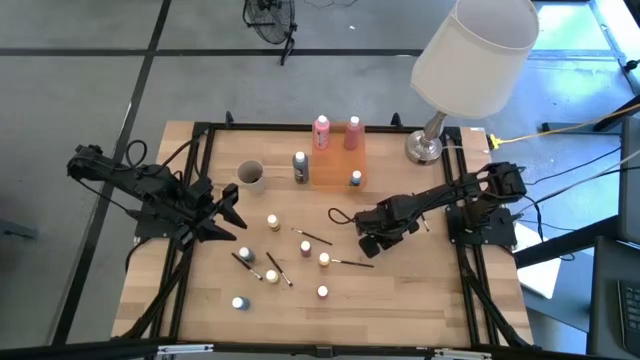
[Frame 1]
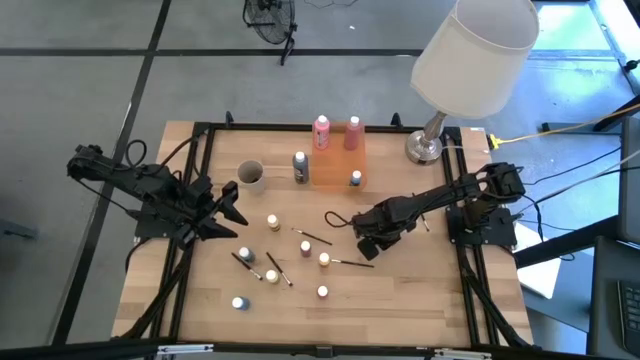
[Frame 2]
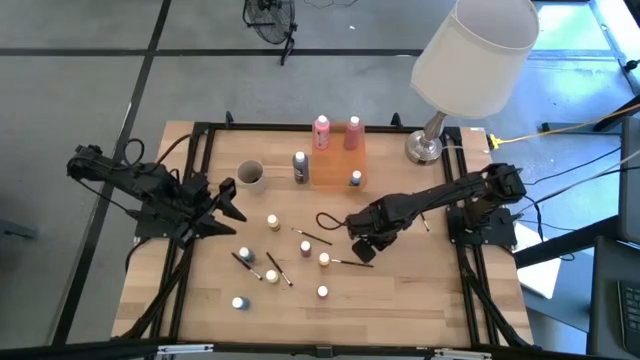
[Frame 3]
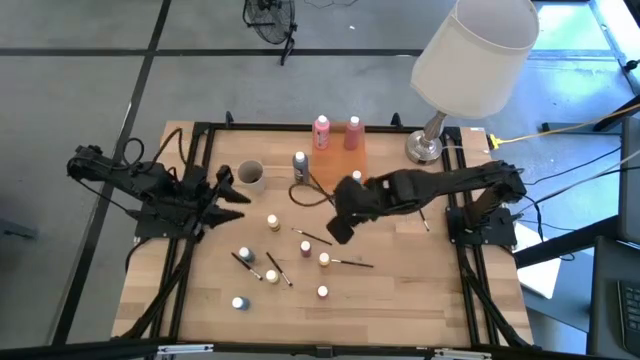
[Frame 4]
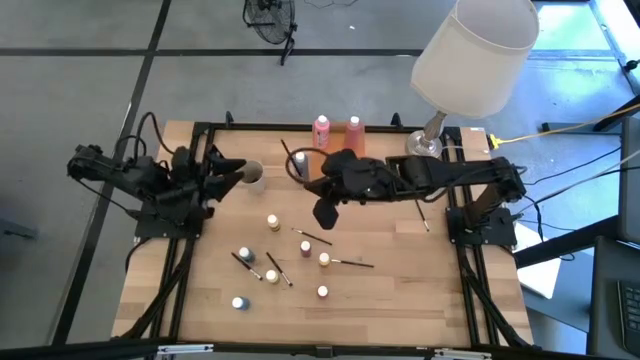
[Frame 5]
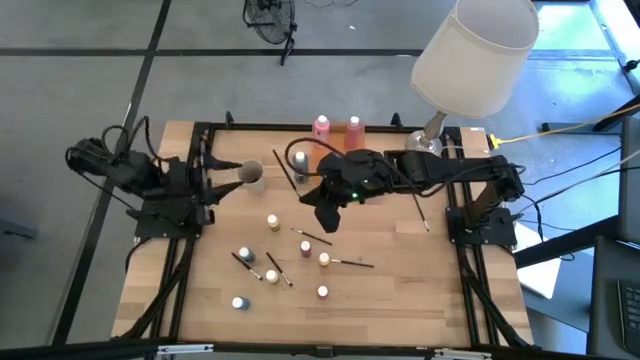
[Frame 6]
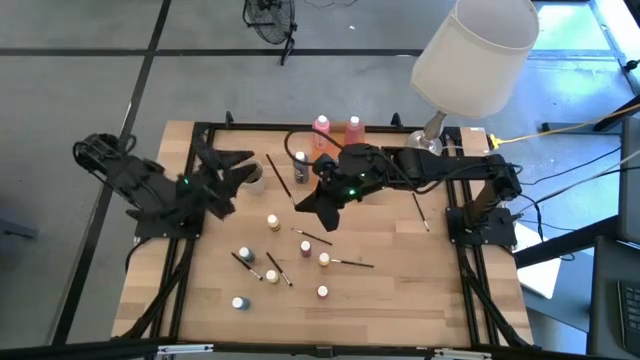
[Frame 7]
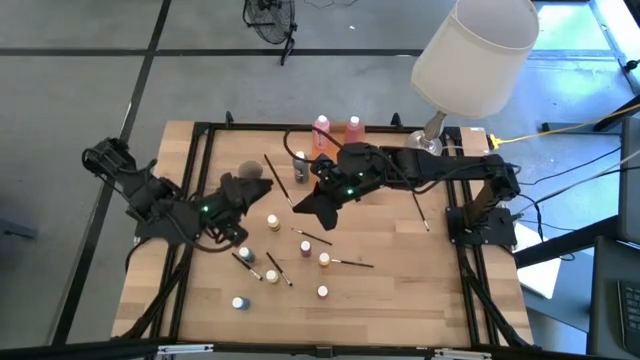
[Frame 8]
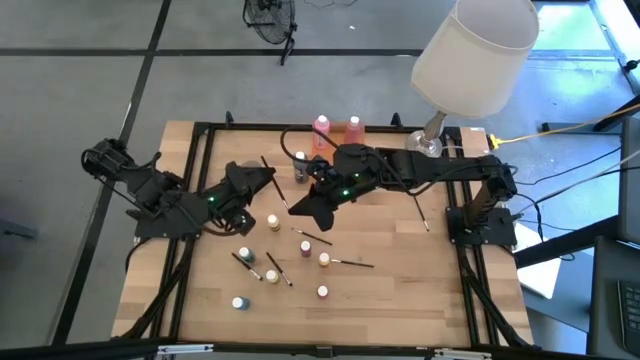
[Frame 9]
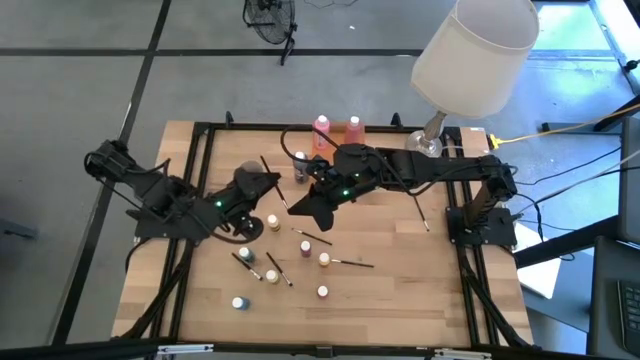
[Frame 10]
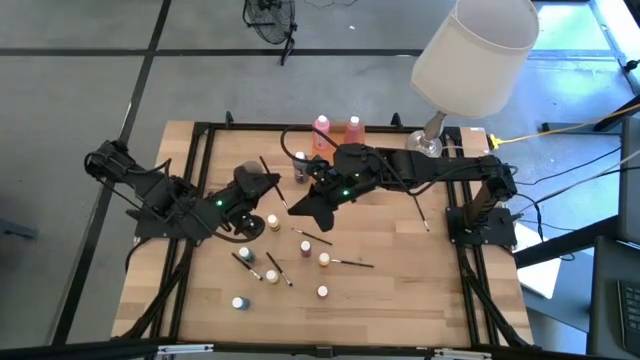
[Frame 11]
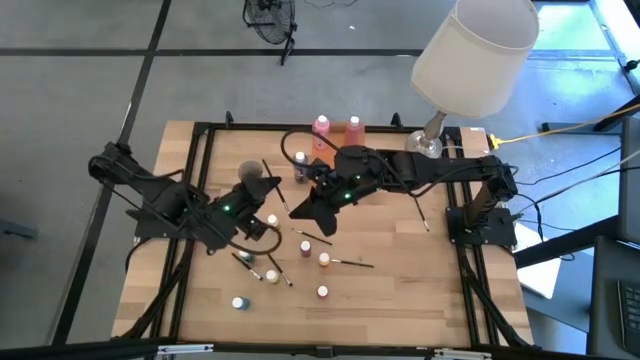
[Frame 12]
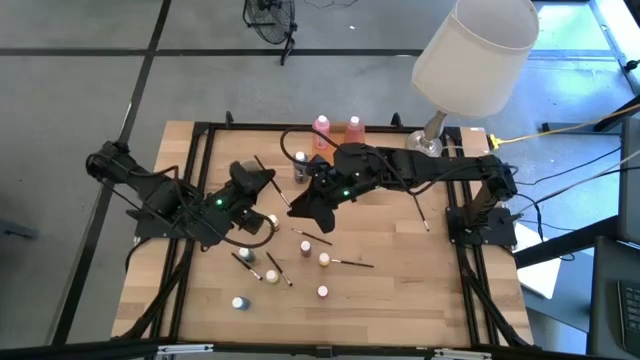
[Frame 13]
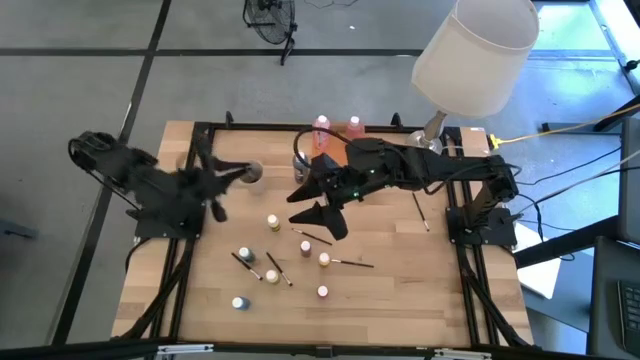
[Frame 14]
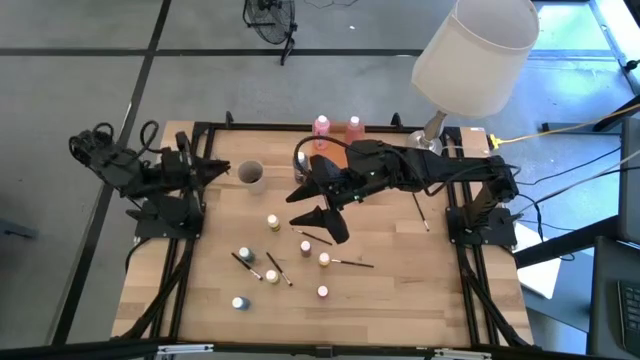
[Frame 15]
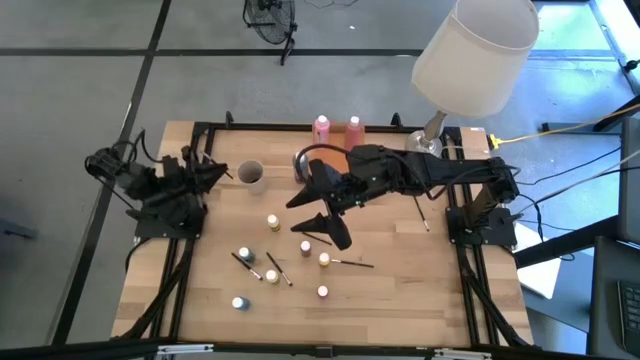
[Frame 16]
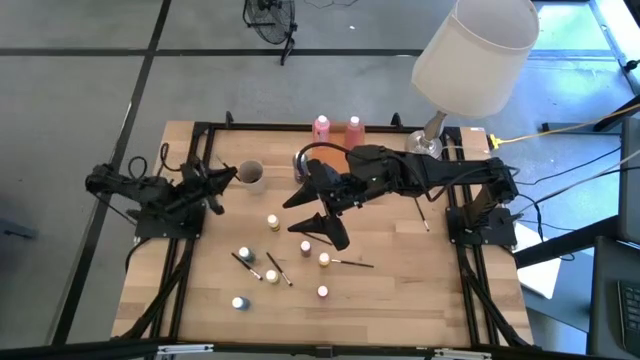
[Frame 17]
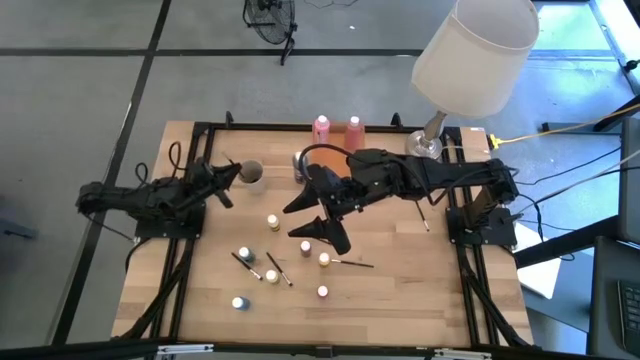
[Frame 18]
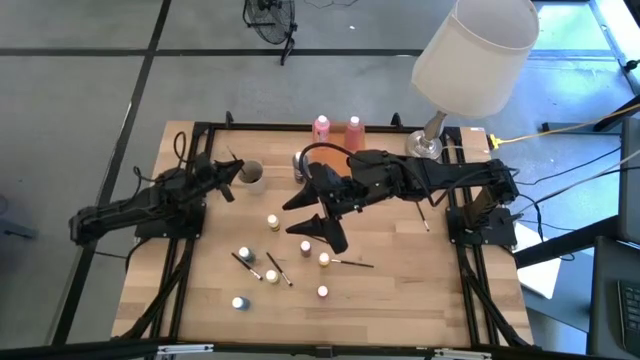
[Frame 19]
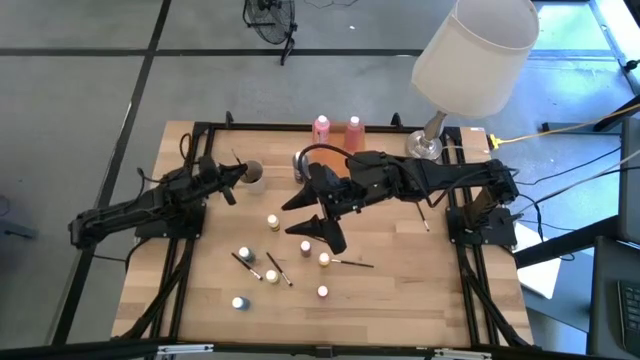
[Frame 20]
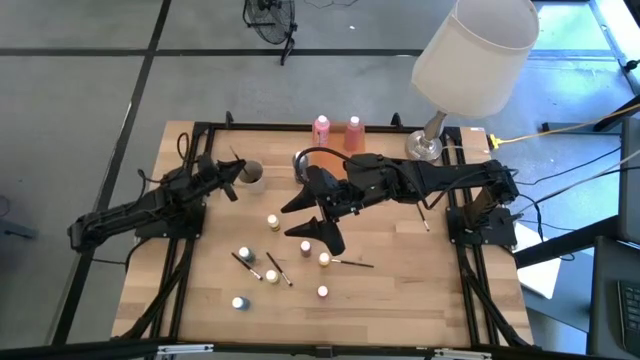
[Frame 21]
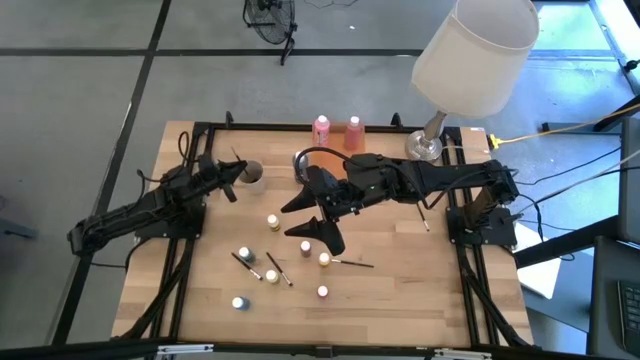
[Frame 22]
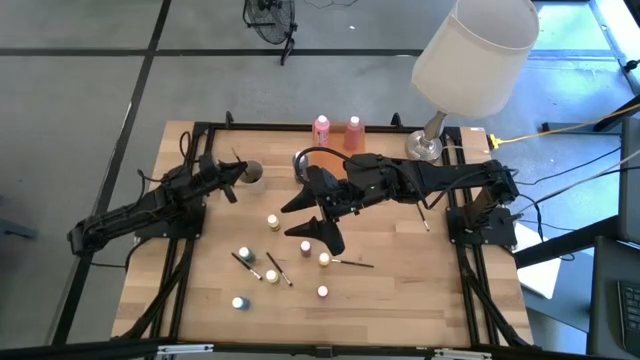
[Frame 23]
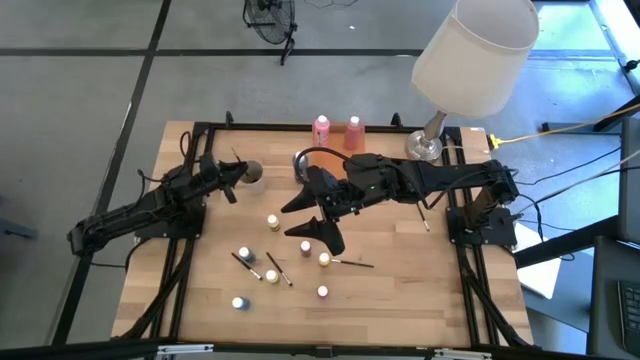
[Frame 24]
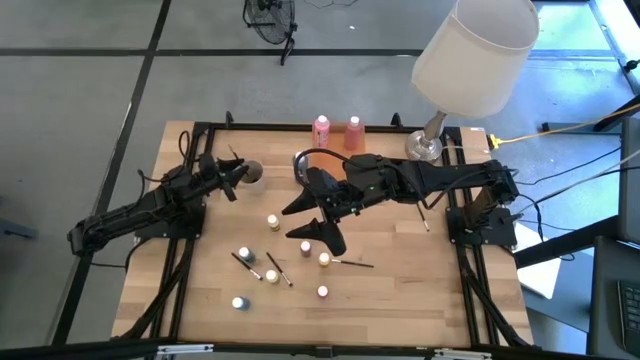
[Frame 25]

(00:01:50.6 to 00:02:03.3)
Task: Pick & Place Paint Supplies
Put the silver paint brush into the white cup

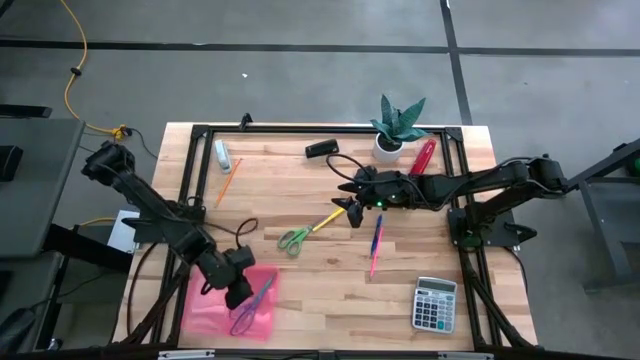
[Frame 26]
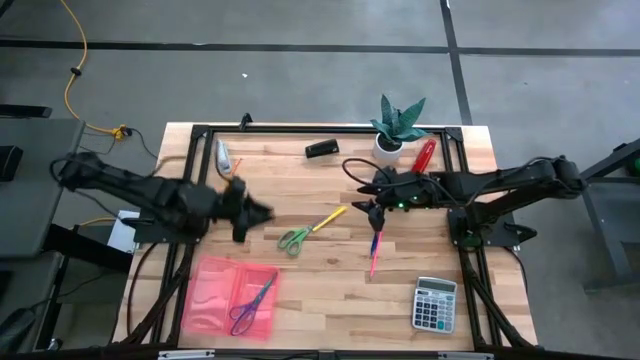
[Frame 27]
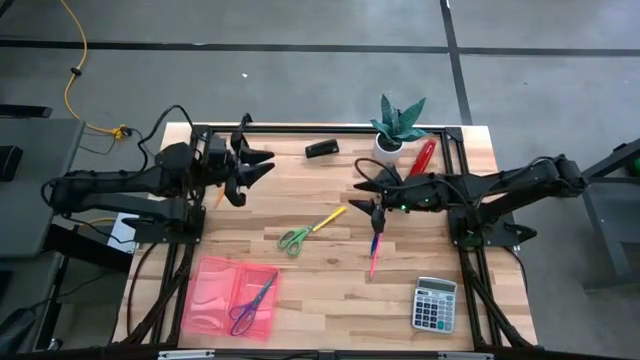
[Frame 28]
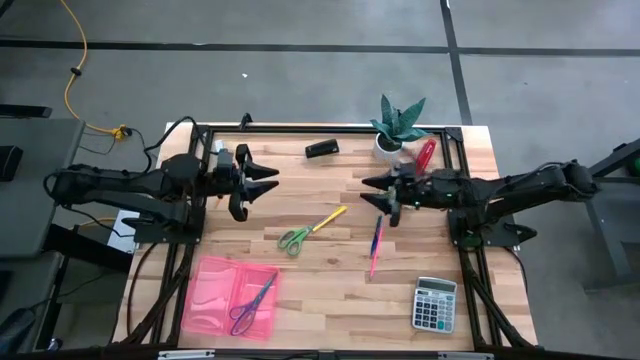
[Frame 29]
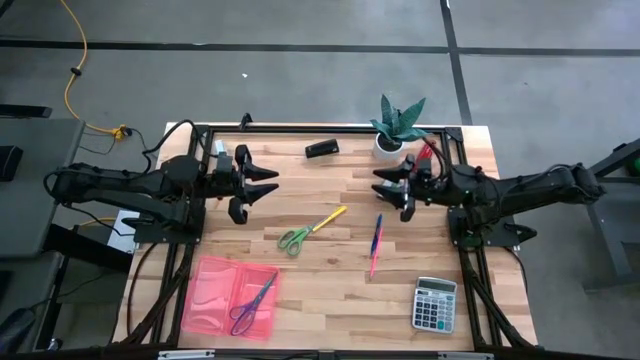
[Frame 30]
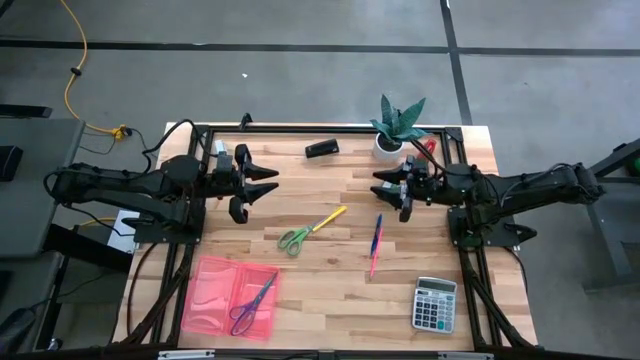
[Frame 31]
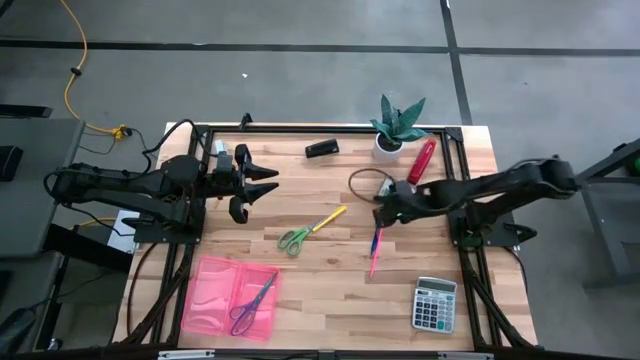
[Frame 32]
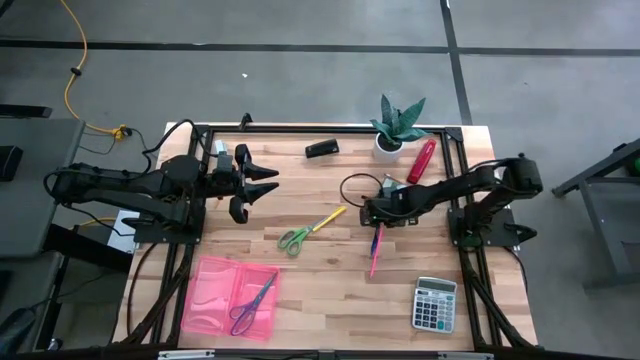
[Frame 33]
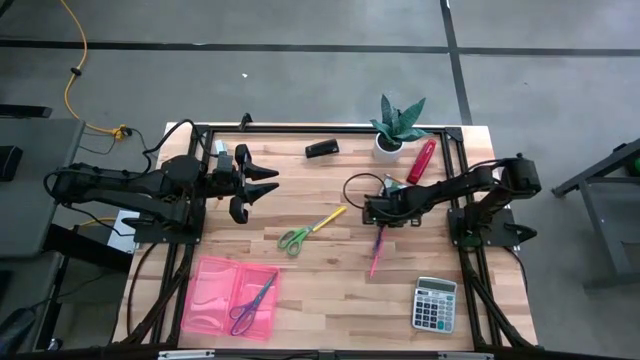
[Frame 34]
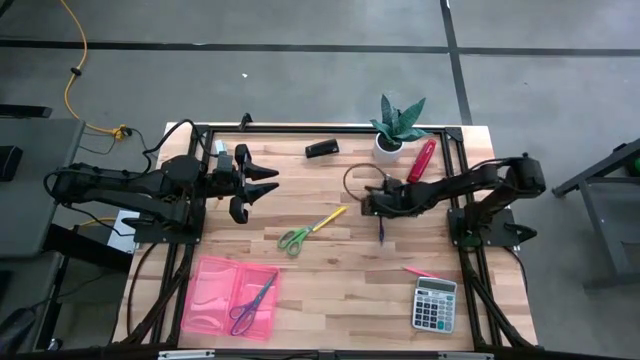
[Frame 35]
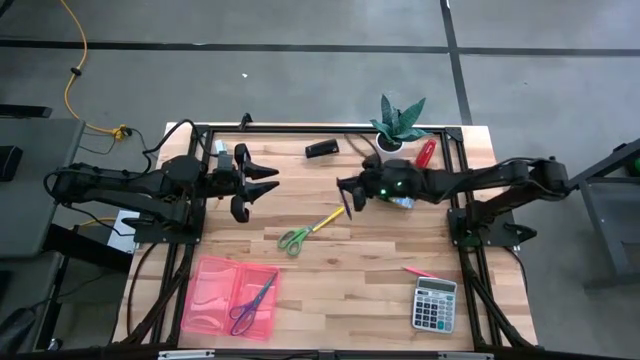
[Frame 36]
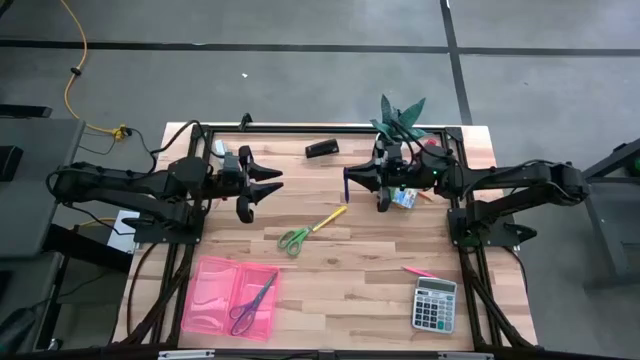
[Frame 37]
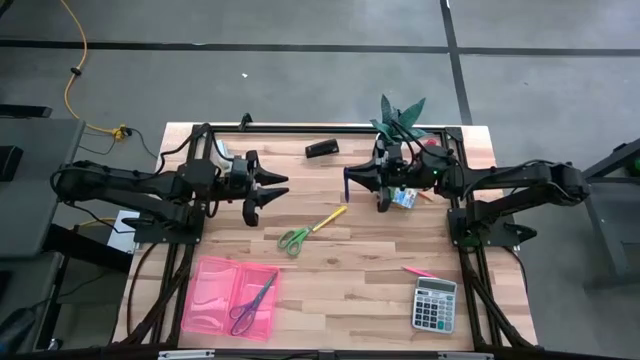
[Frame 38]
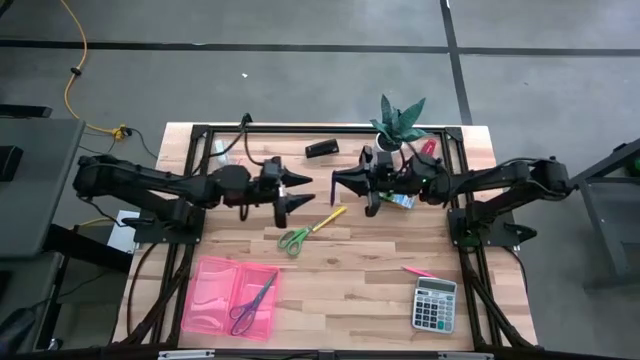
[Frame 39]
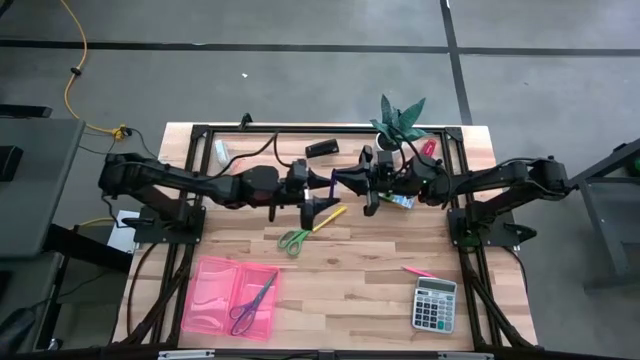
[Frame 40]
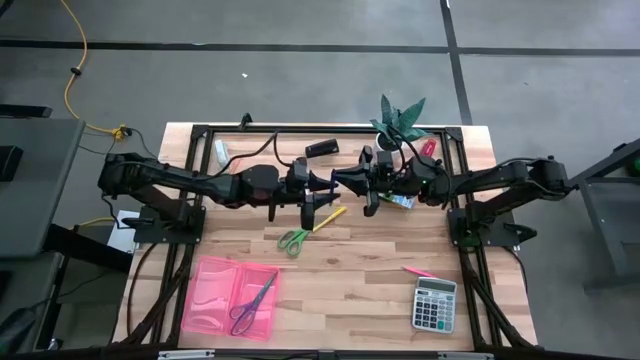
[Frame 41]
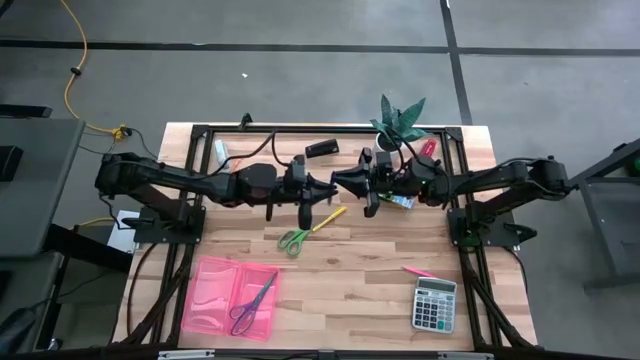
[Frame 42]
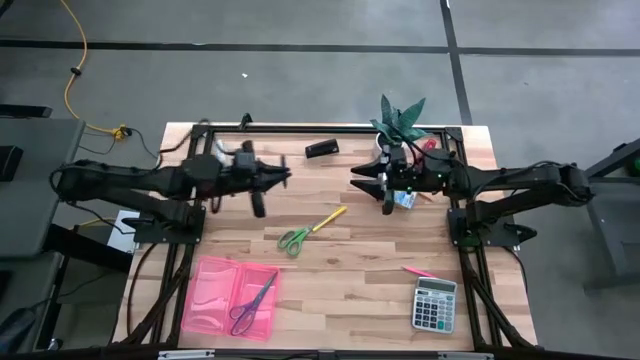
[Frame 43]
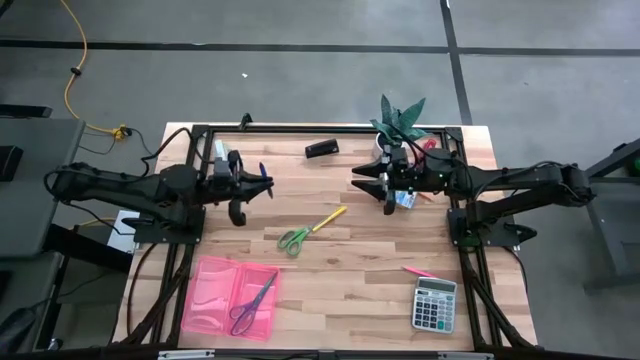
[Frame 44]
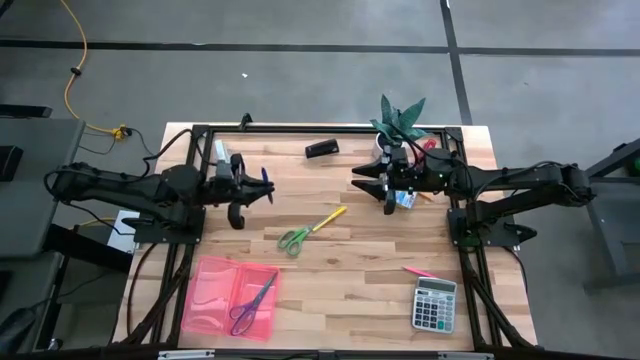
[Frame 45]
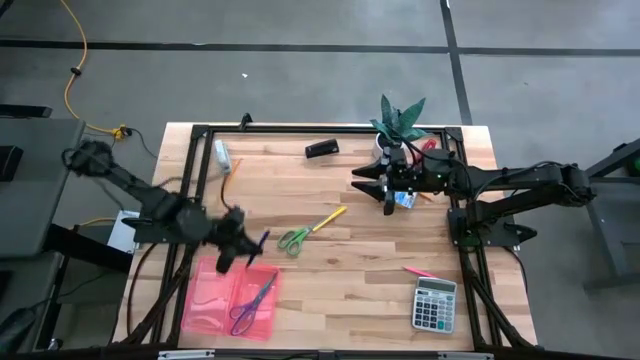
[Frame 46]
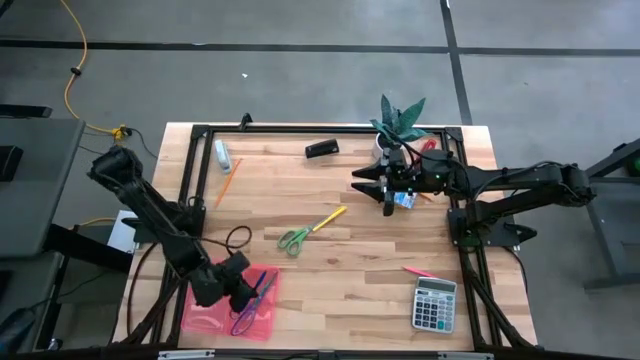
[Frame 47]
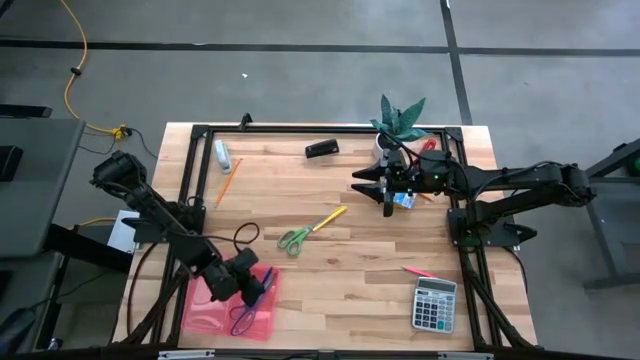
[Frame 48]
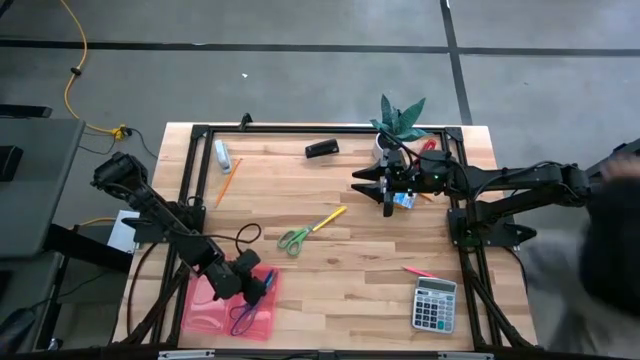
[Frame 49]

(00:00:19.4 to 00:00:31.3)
Task: Pack school essentials
Put the blue pen into the supply box
